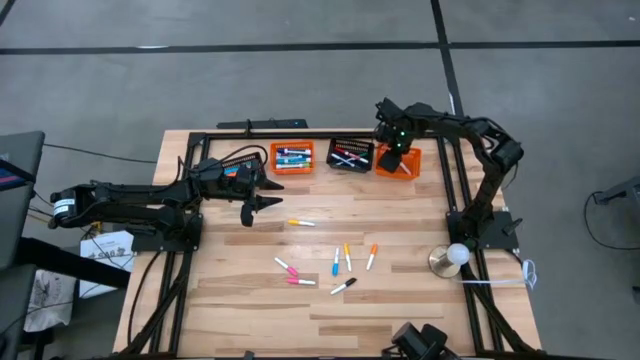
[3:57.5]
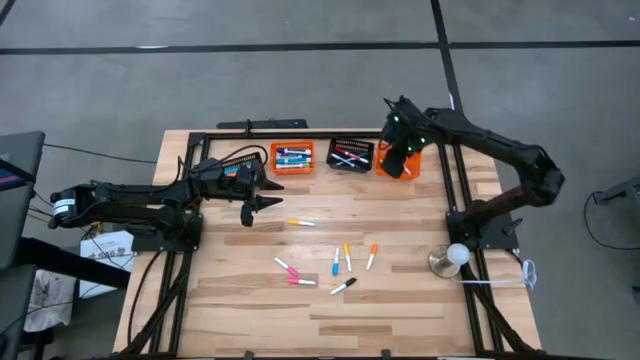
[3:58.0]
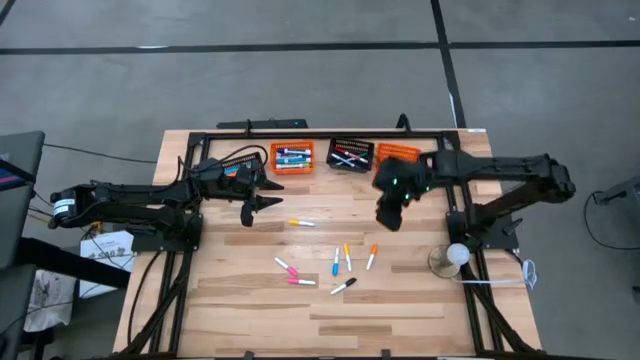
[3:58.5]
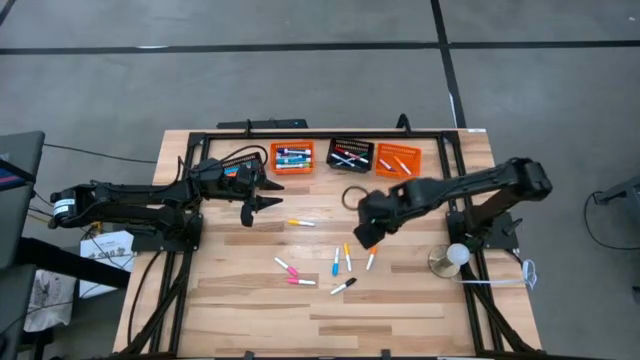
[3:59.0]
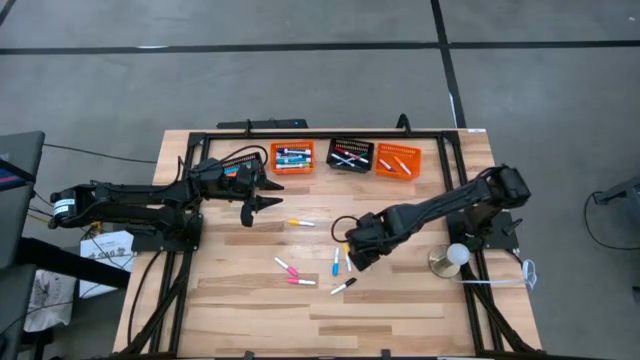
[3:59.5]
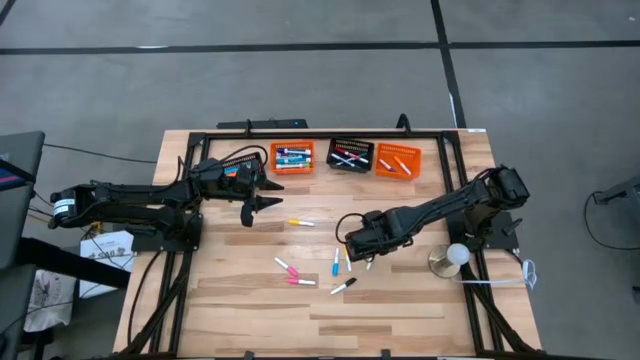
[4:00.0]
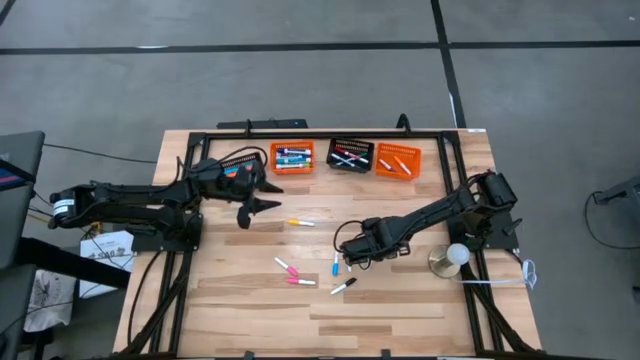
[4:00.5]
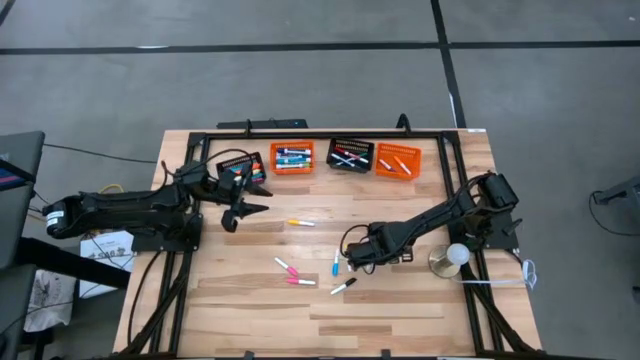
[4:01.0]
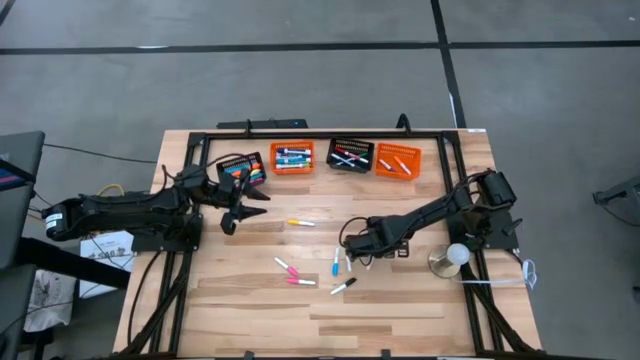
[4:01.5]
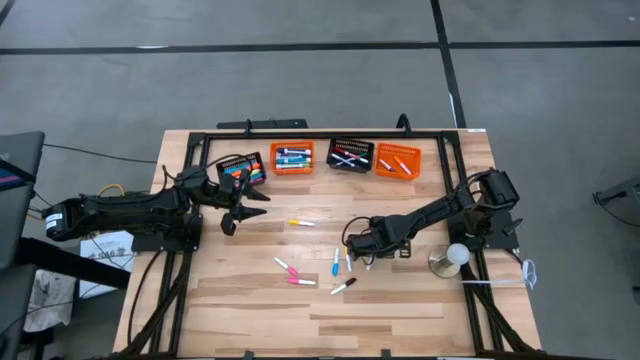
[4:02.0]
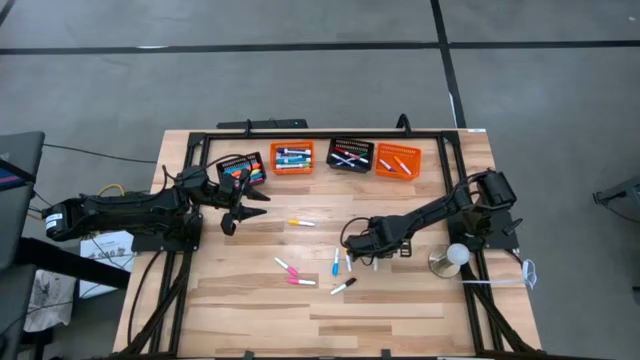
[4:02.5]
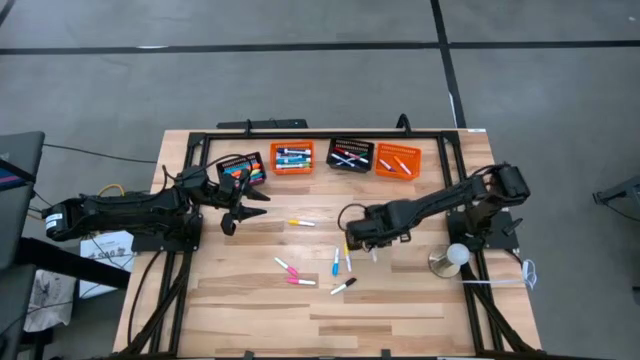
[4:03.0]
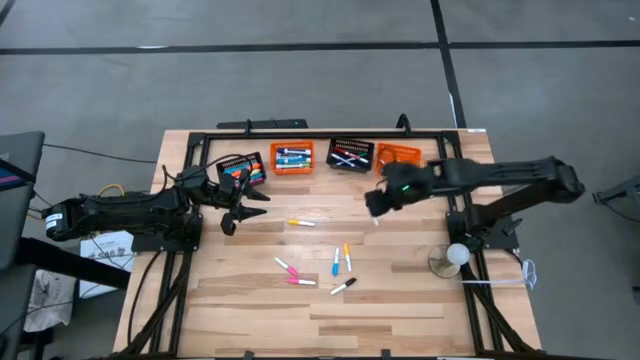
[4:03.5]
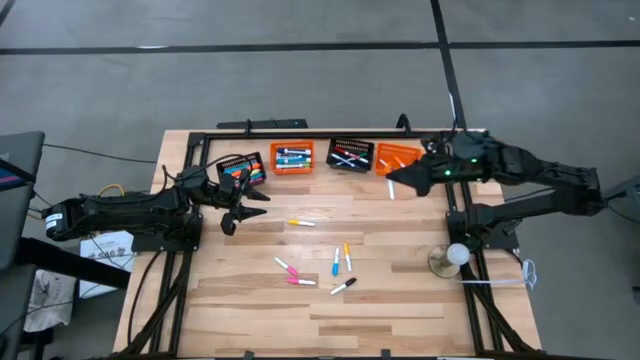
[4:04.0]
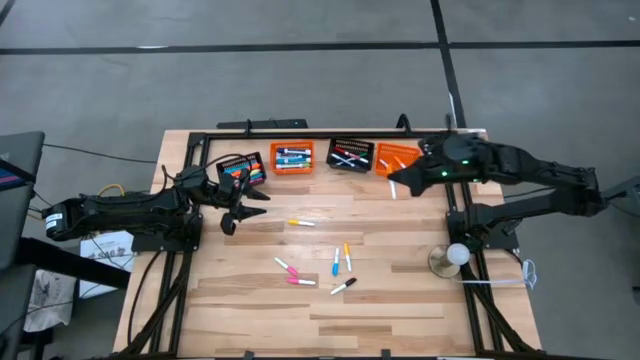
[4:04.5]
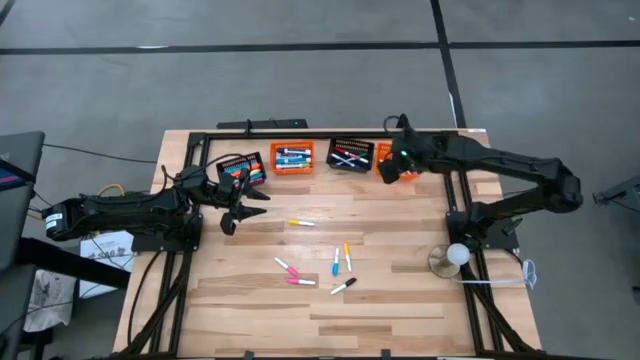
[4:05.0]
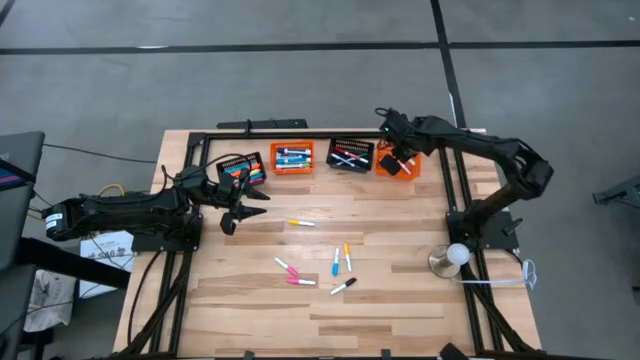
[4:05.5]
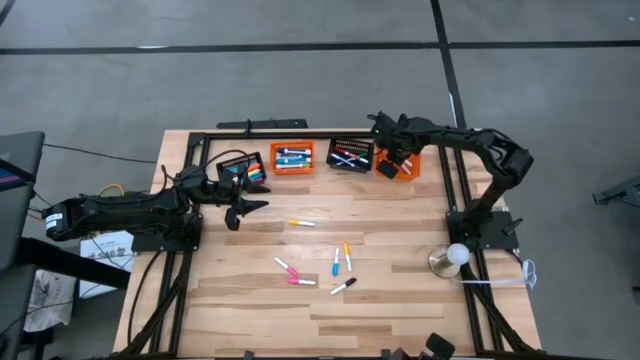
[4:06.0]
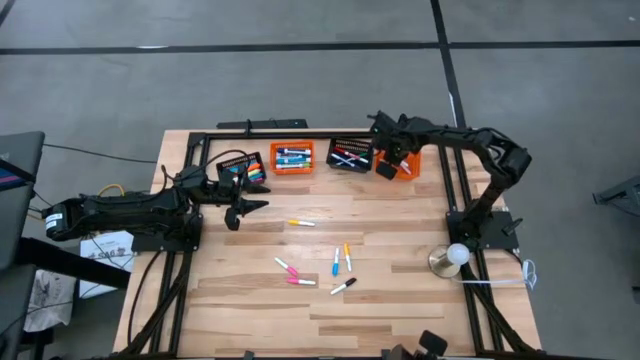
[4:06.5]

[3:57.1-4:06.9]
Task: Pick & Place Markers
Put the small orange highlighter pen into the right orange bin

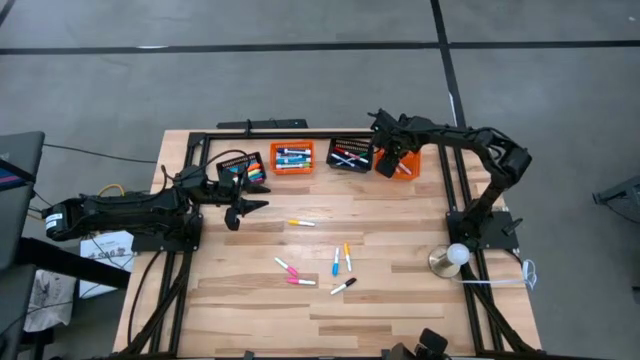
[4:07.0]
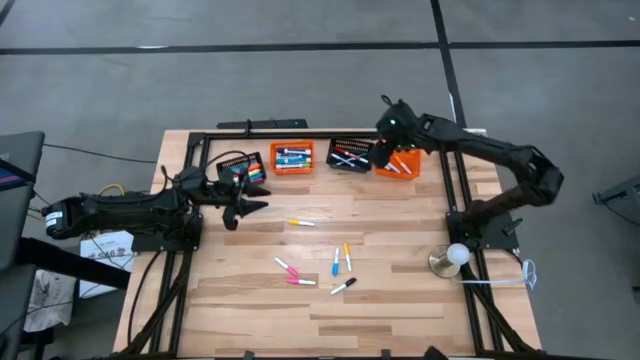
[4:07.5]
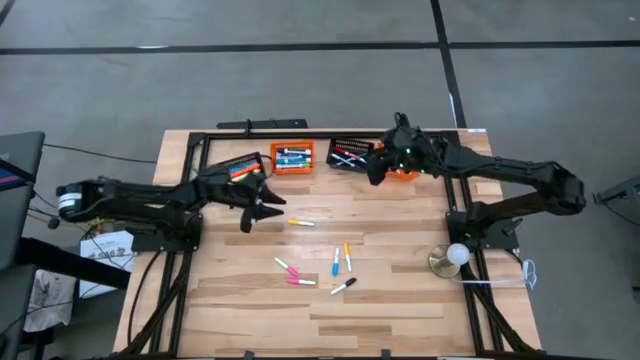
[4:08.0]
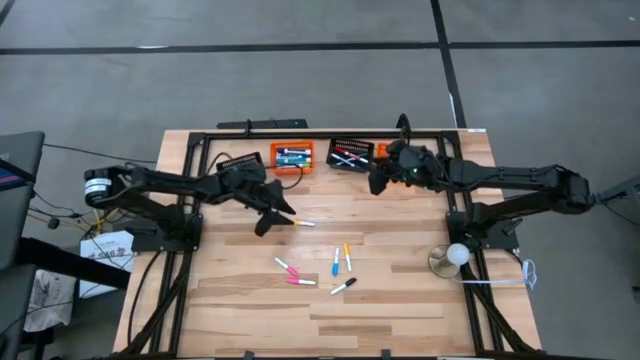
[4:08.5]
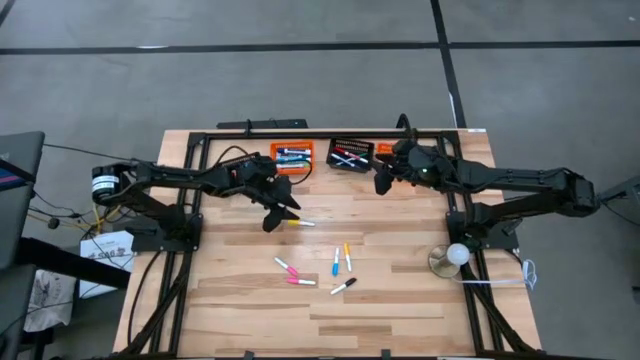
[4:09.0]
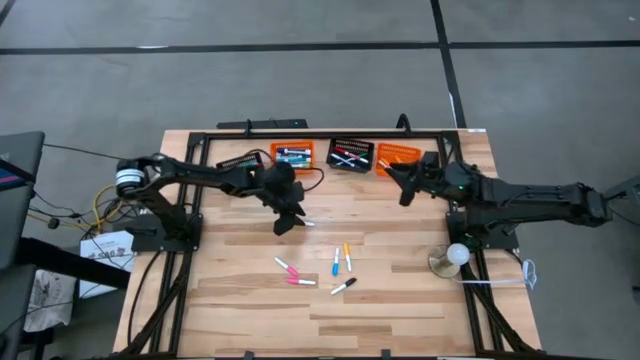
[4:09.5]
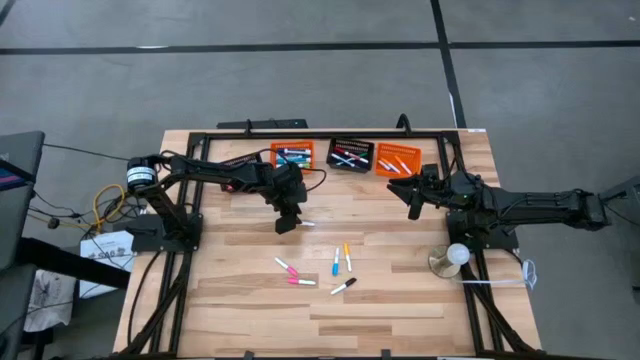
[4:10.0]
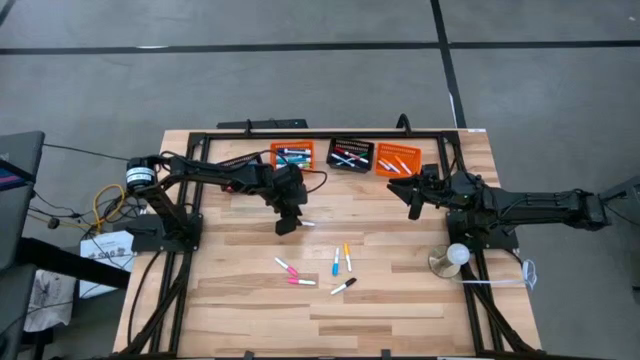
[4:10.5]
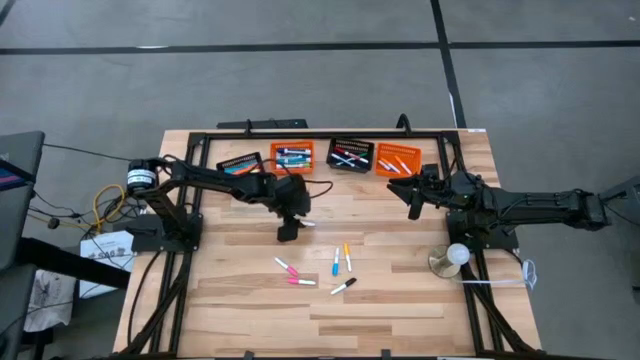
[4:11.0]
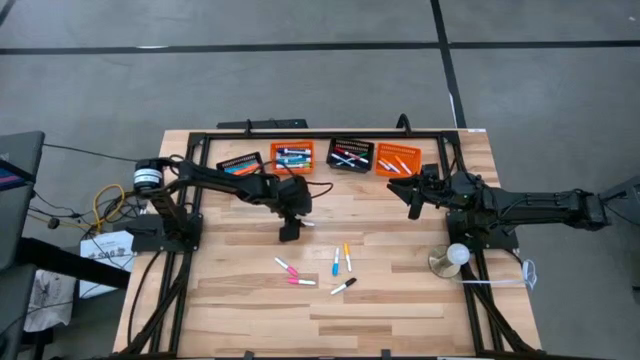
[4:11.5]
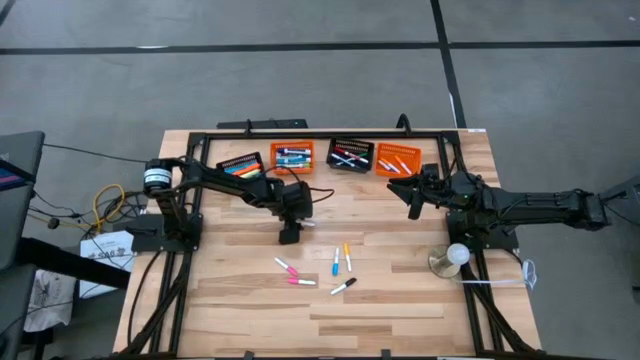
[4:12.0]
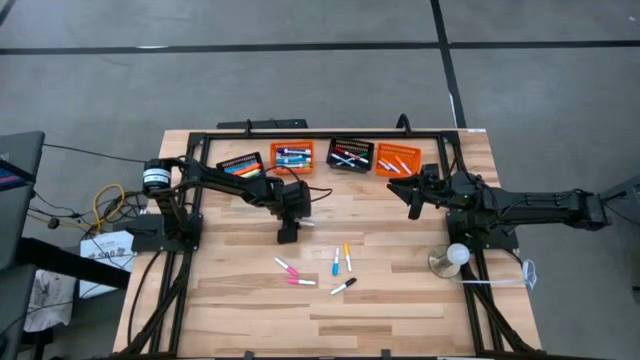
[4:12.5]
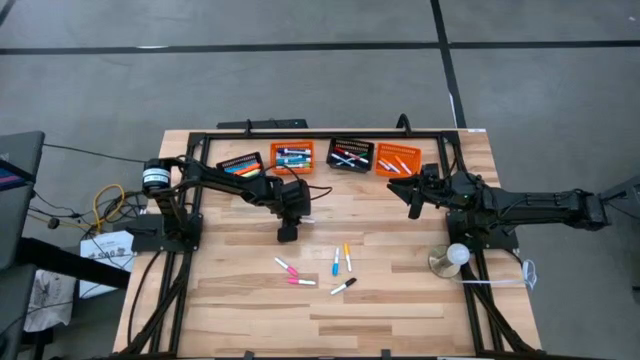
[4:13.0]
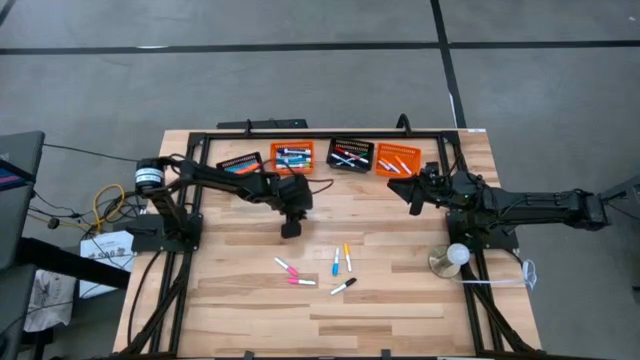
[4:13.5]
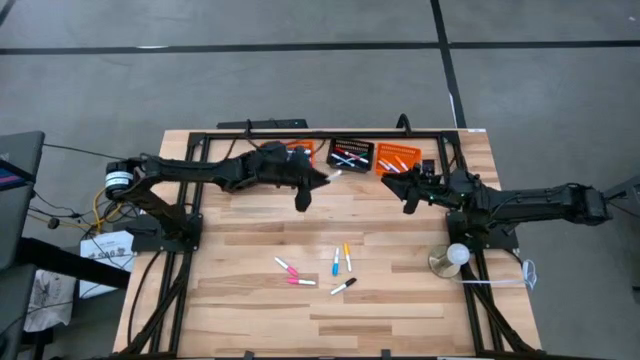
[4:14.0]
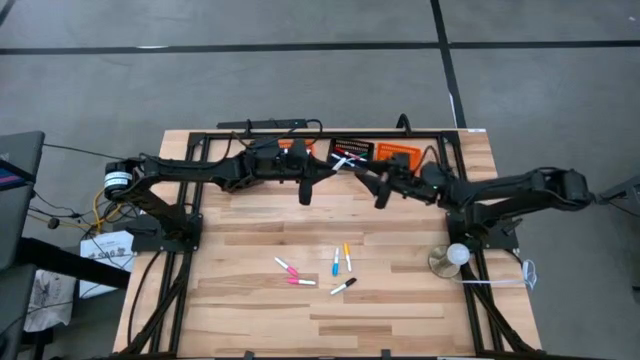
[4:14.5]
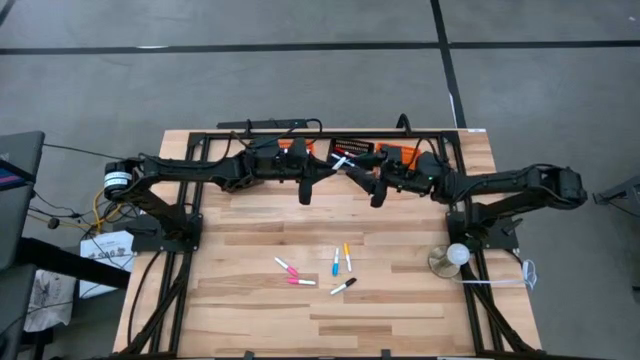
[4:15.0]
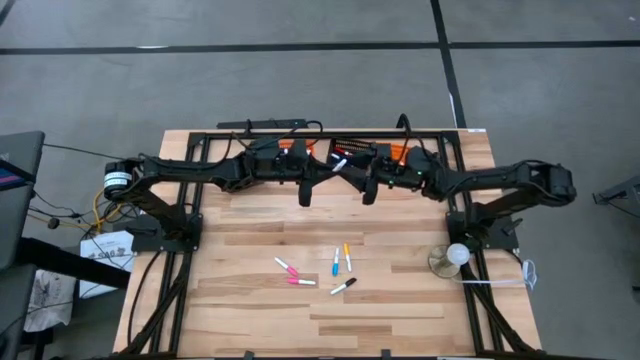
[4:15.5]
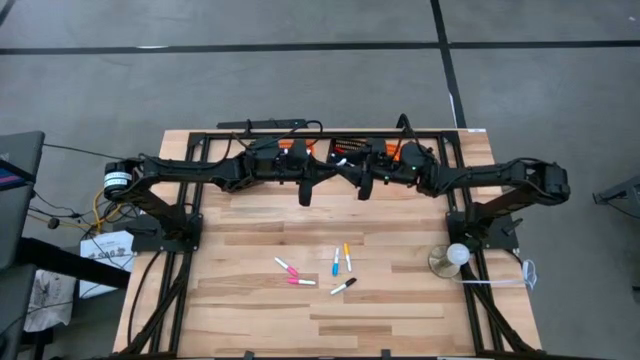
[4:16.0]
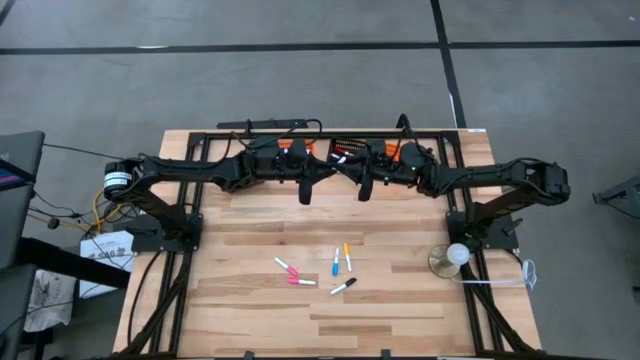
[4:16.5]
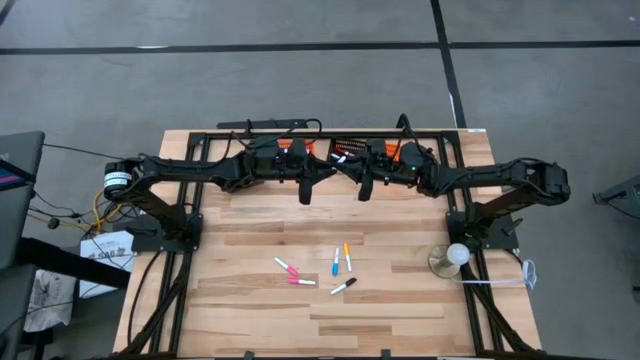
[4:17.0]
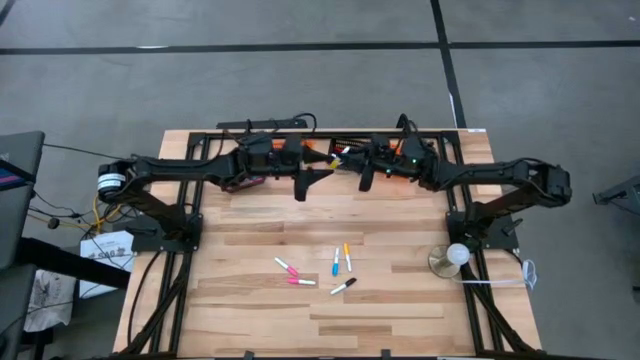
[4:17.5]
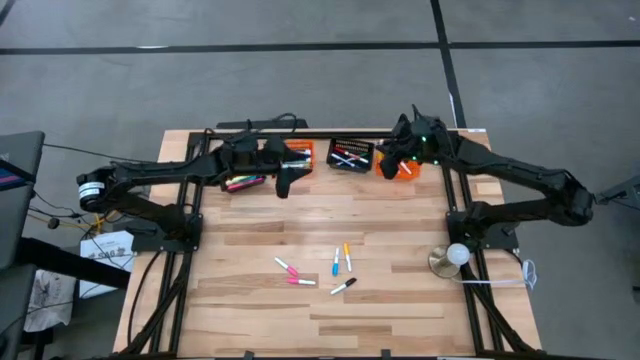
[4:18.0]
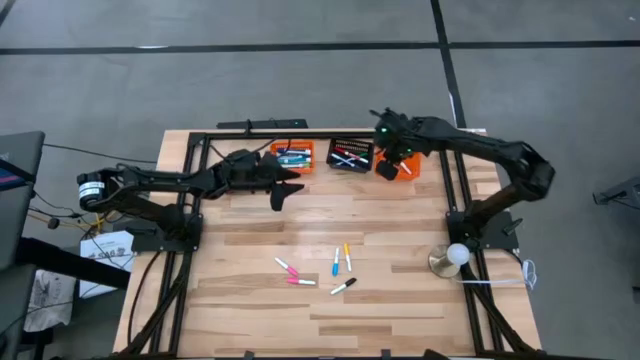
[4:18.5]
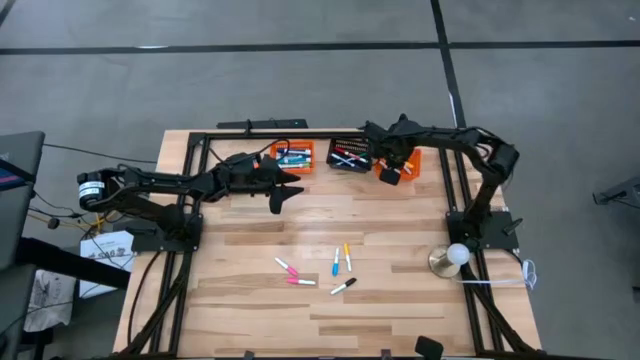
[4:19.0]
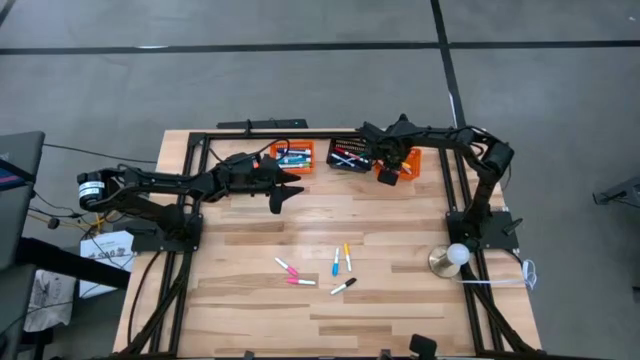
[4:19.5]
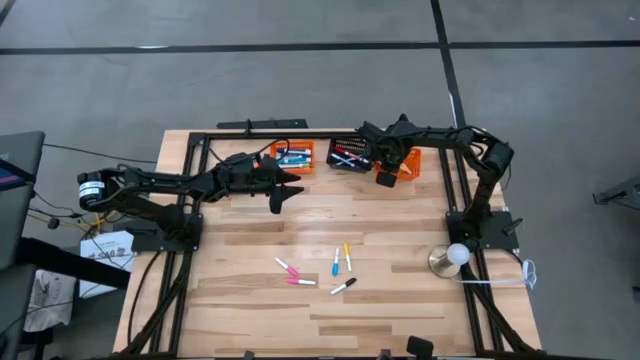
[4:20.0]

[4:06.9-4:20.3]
Put the small yellow highlighter pen into the right orange bin
